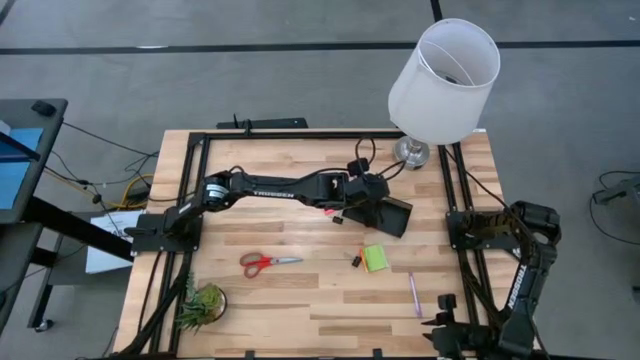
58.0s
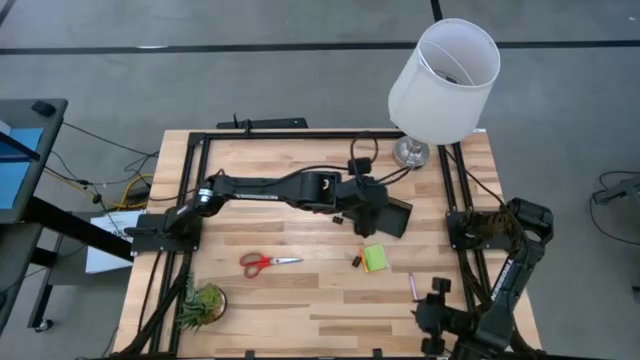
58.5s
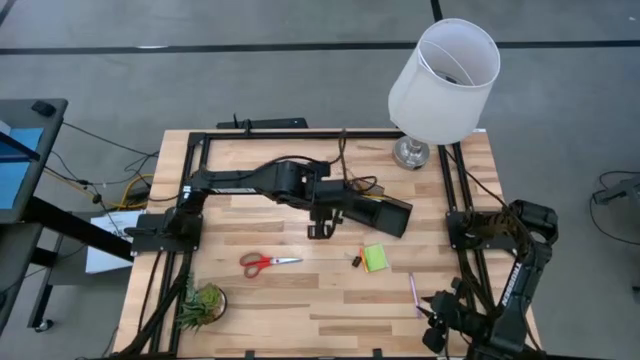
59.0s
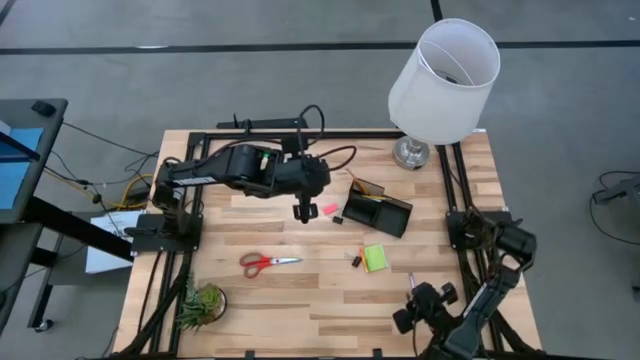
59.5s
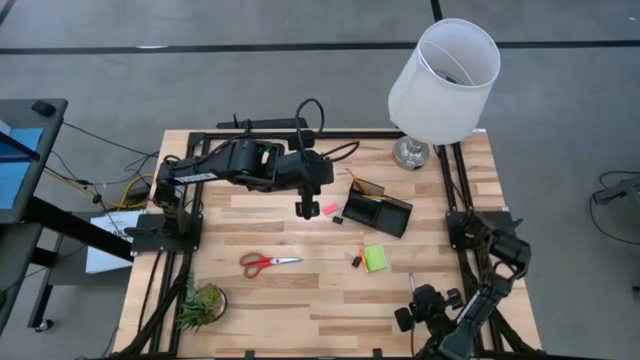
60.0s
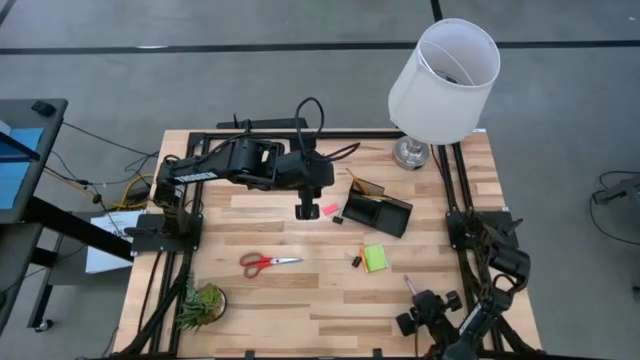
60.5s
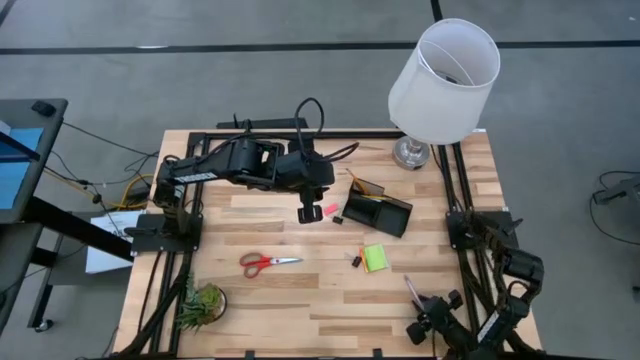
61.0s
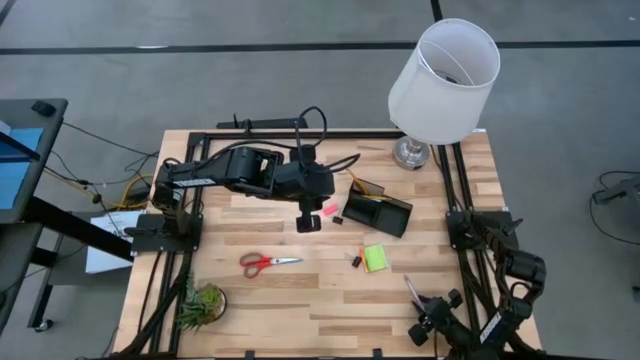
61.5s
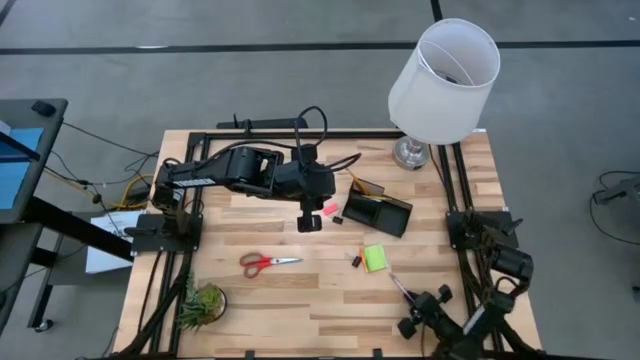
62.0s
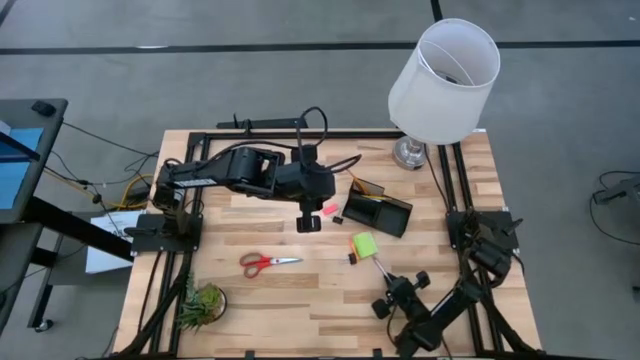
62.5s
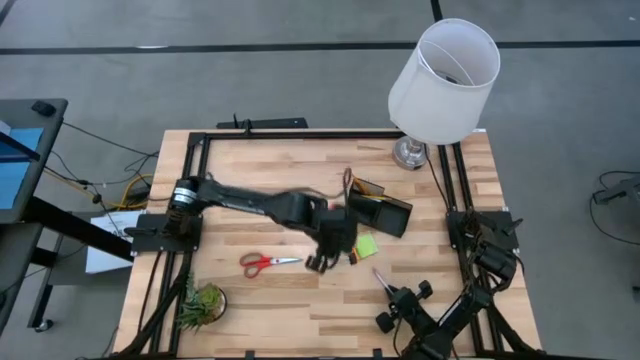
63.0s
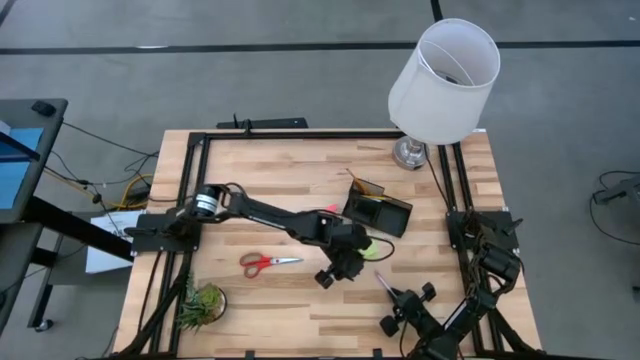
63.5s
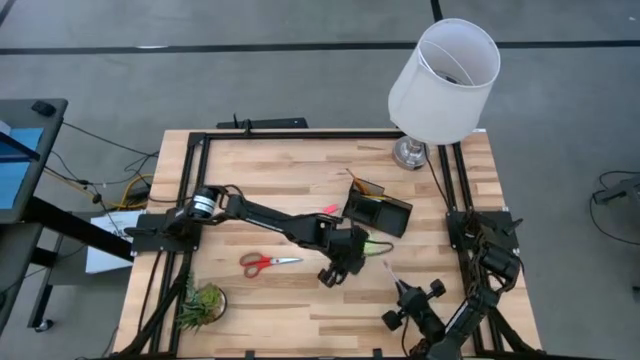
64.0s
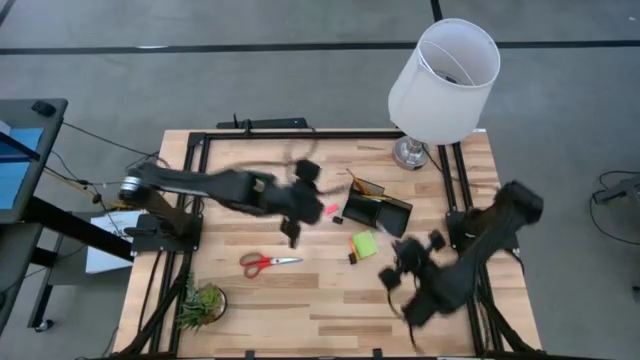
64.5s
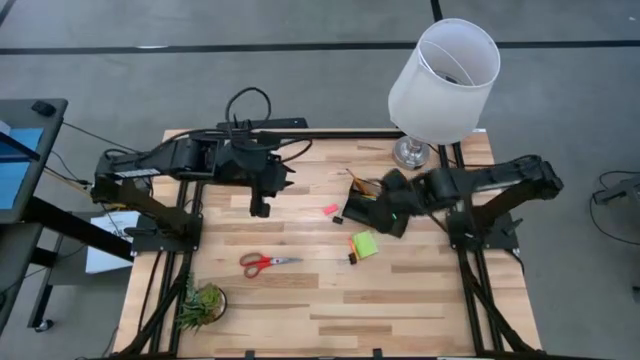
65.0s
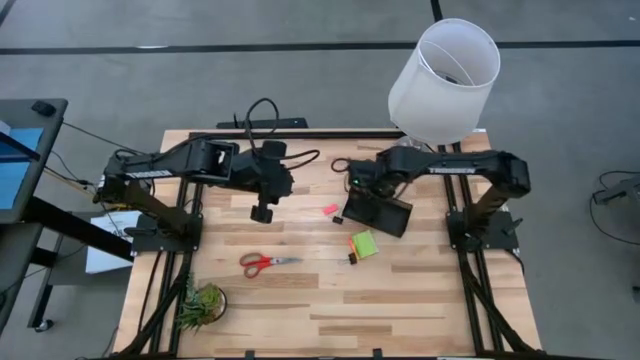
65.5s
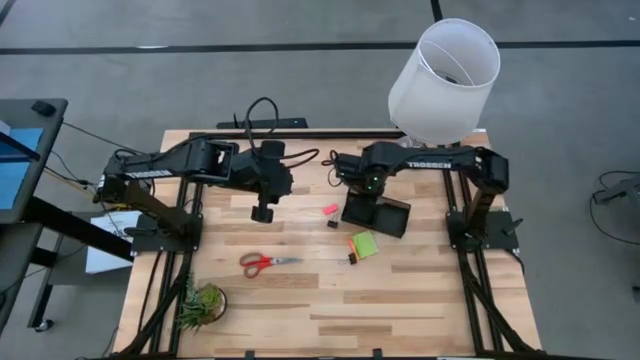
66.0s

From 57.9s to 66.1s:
Task: Pick and place office supplies into organizer
Put the purple pen into the desk organizer

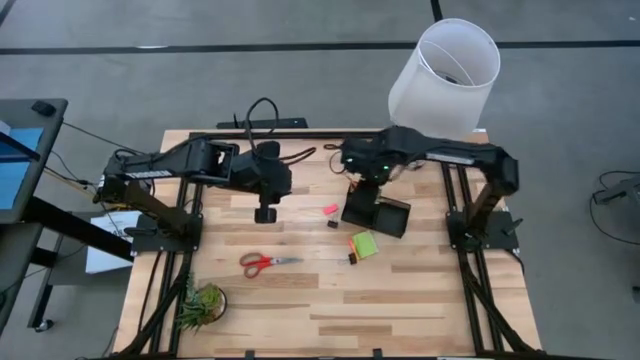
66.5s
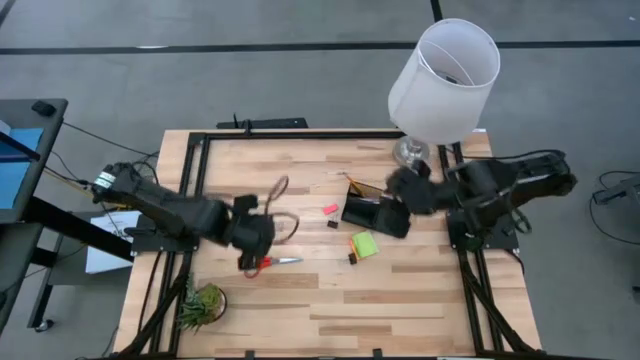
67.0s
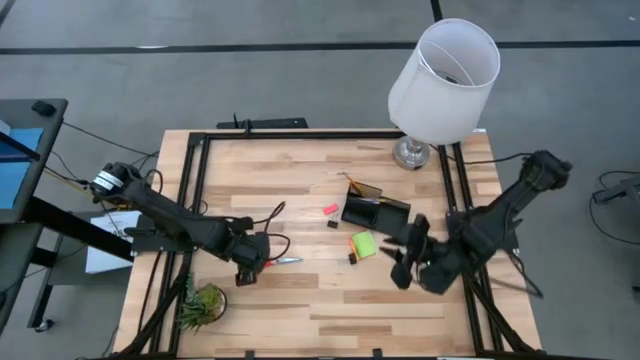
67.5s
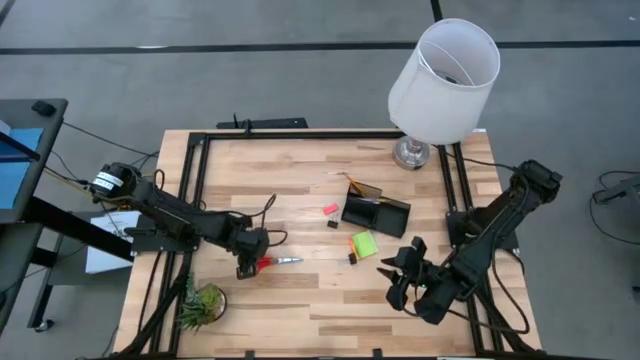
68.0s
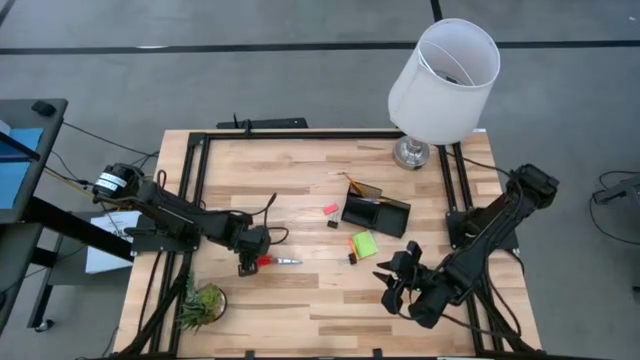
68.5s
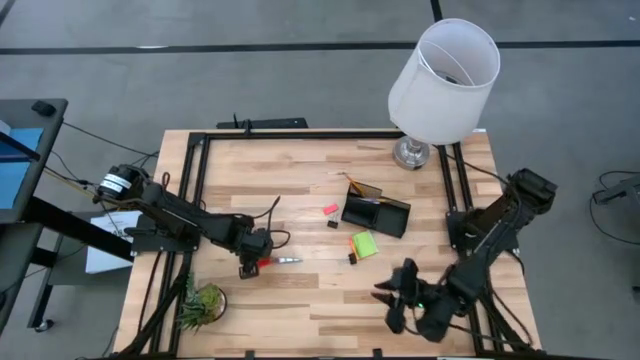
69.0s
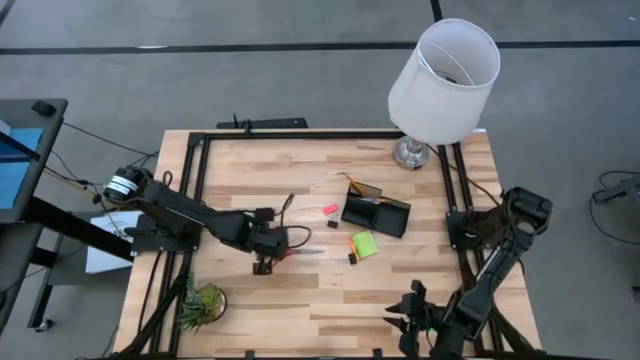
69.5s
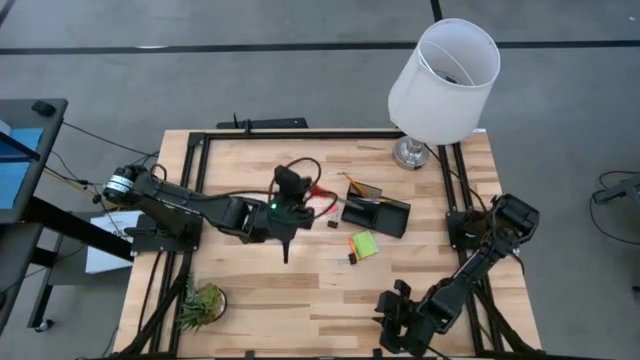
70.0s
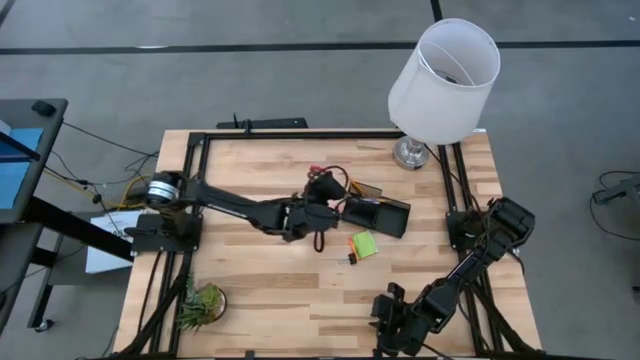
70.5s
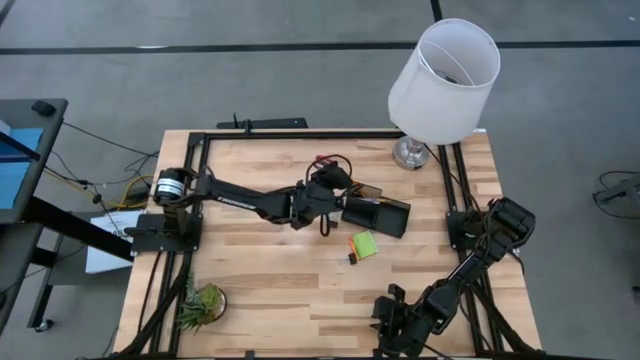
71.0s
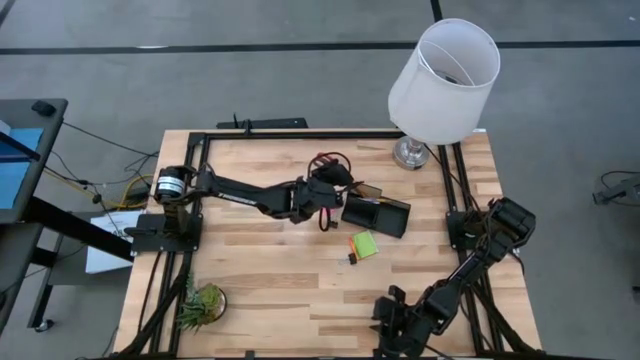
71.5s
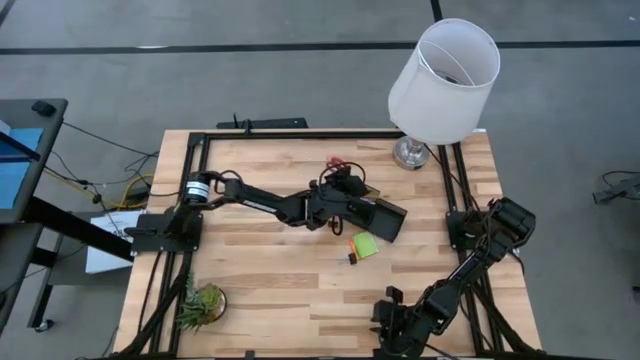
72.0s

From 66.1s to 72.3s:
Put the scissors into the desk organizer

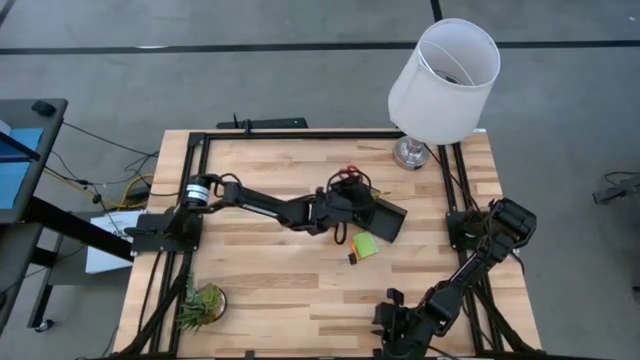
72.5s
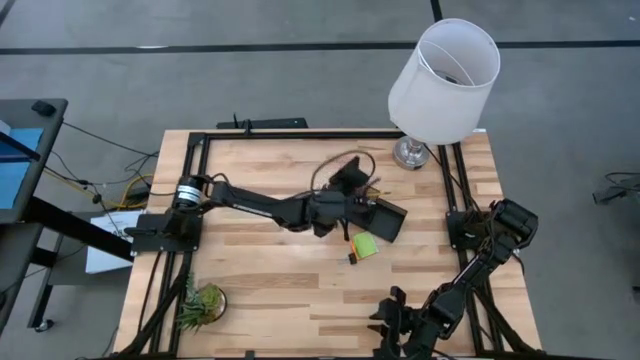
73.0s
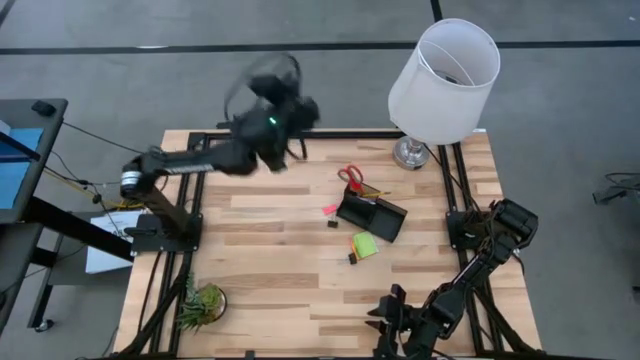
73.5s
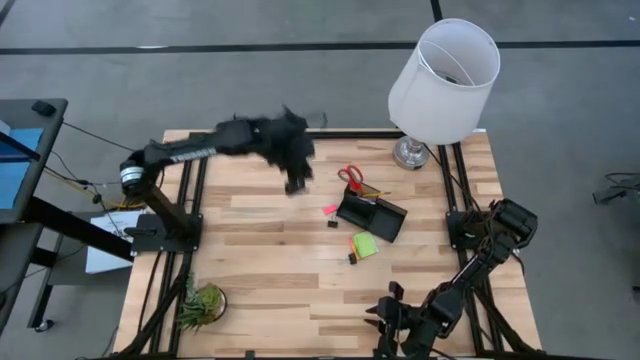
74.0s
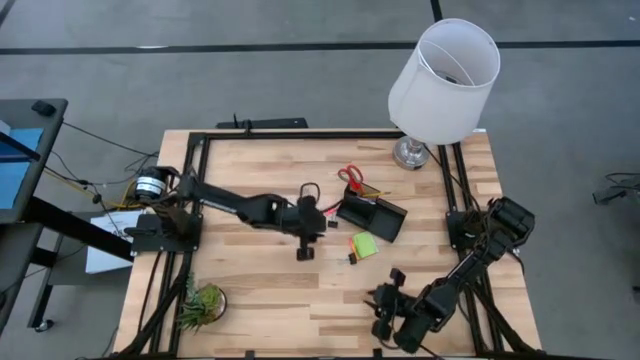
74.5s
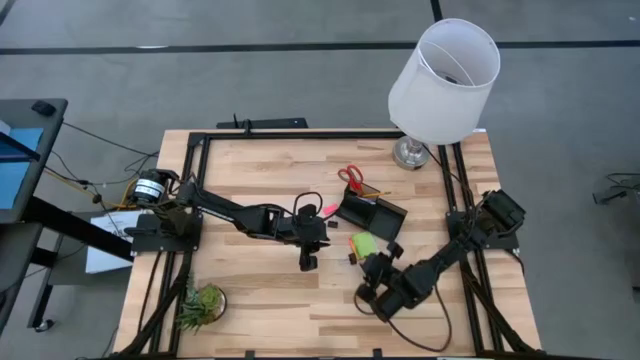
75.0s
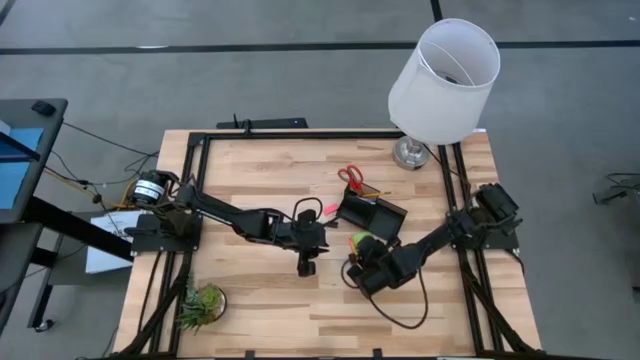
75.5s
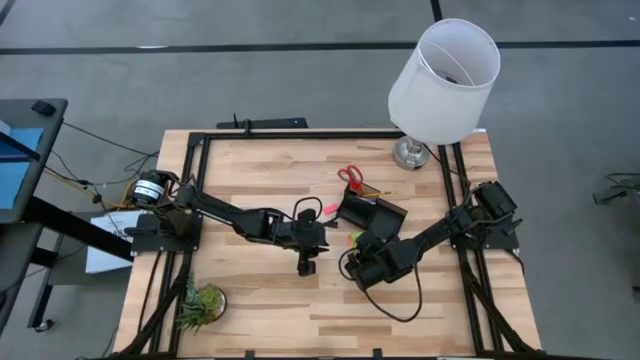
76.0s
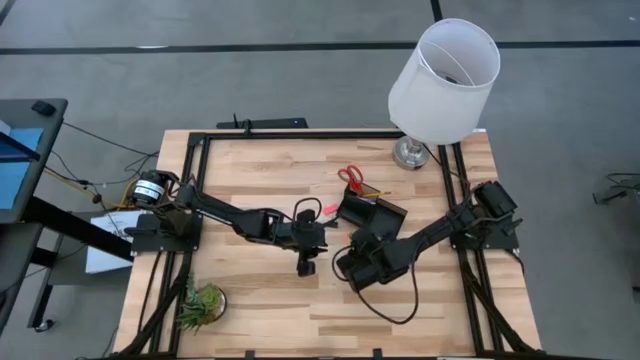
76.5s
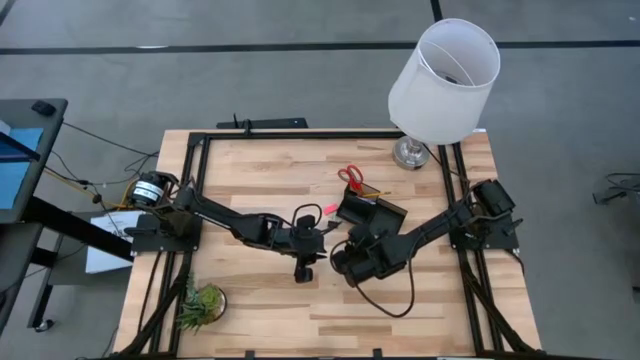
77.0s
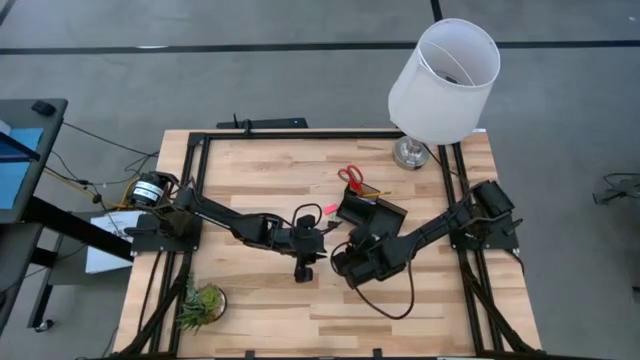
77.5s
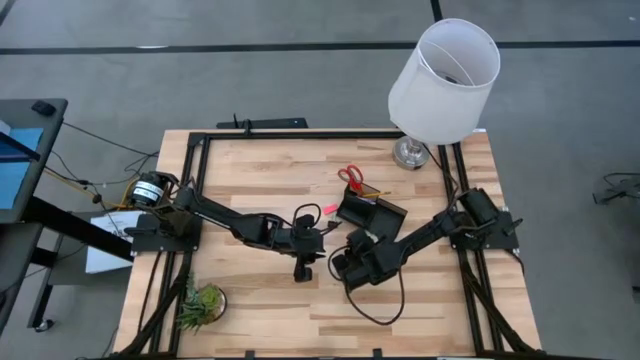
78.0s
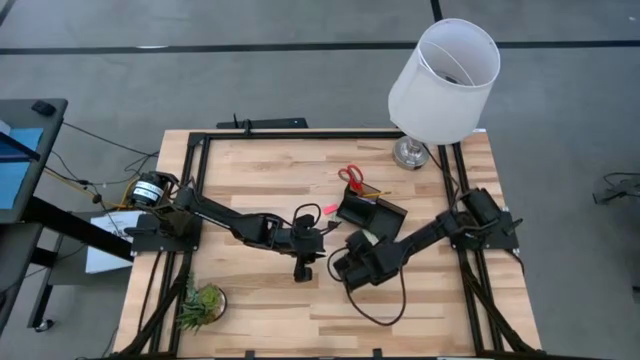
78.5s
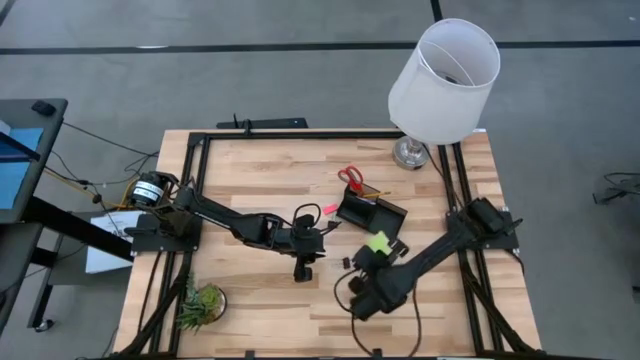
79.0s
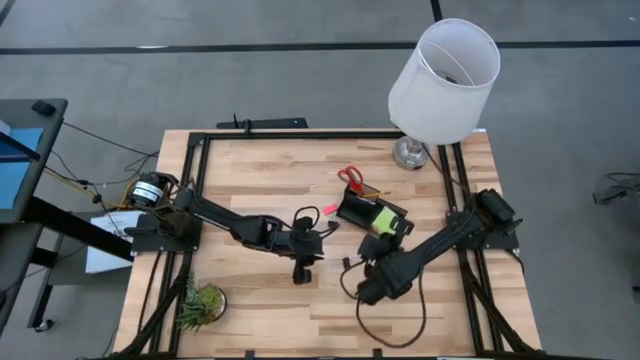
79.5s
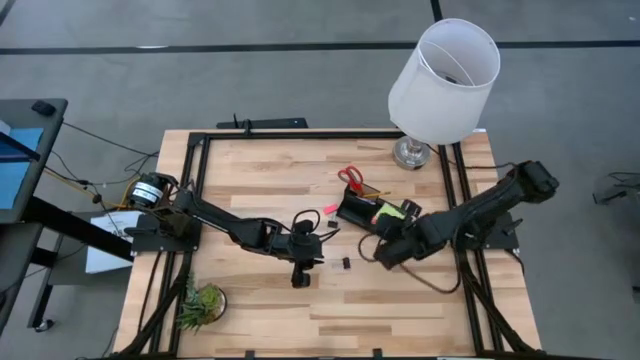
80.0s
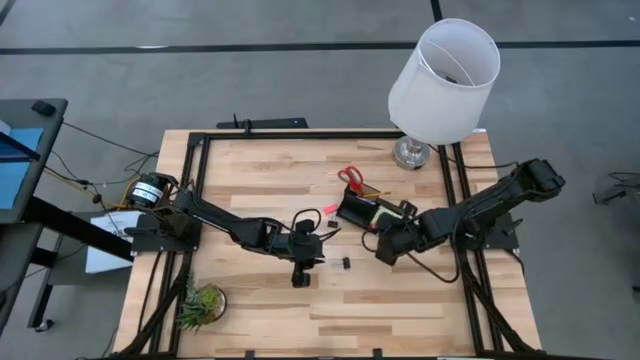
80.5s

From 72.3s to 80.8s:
Put the sticky notes into the desk organizer
